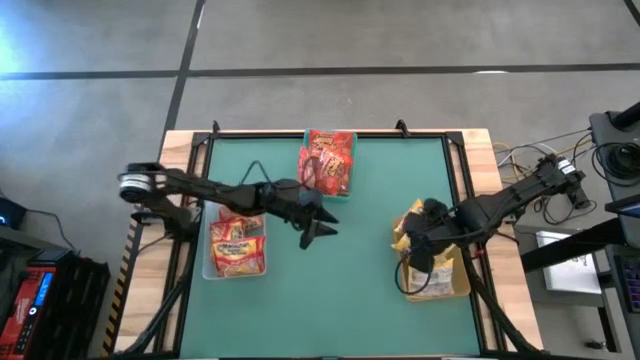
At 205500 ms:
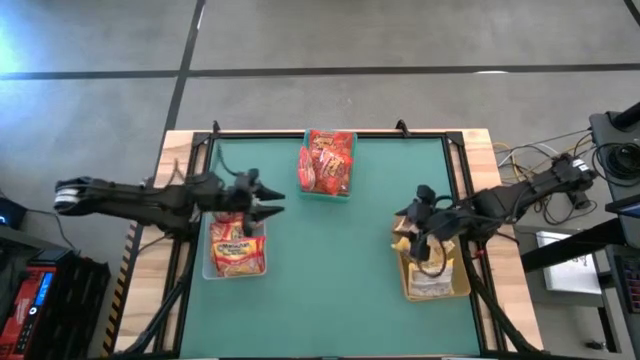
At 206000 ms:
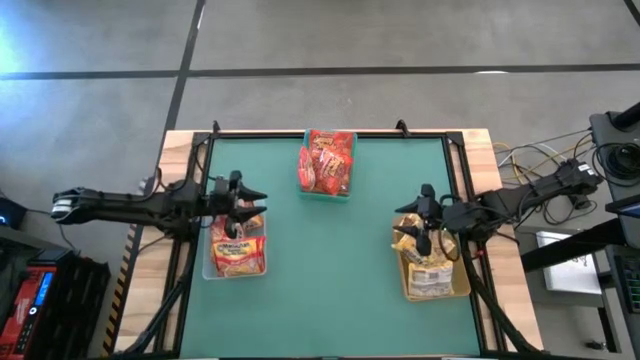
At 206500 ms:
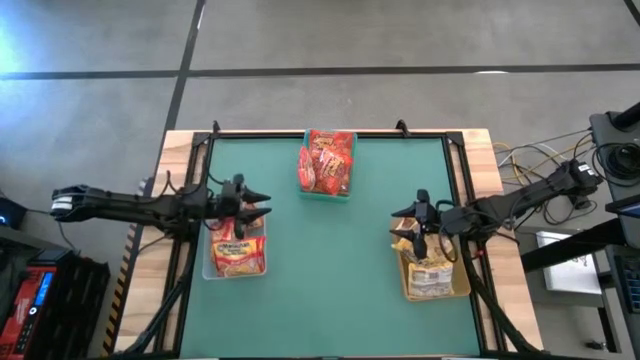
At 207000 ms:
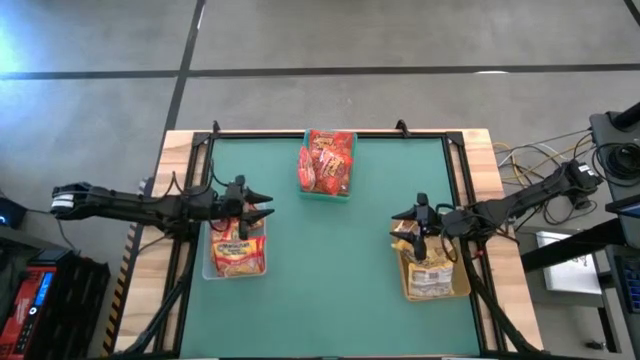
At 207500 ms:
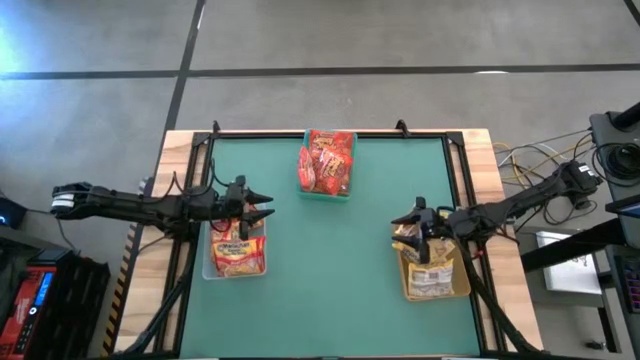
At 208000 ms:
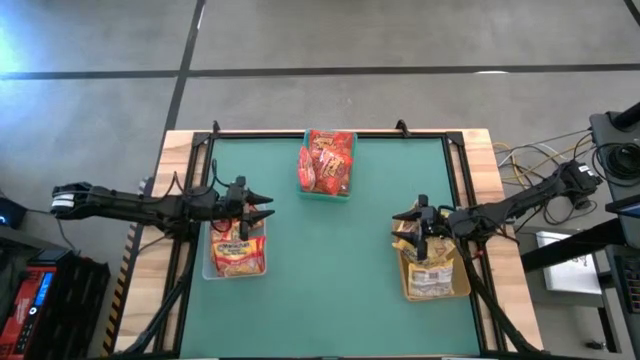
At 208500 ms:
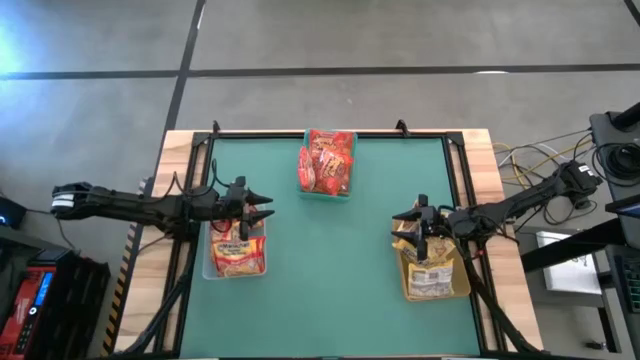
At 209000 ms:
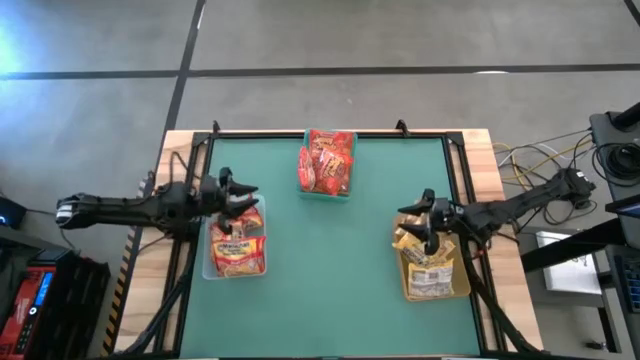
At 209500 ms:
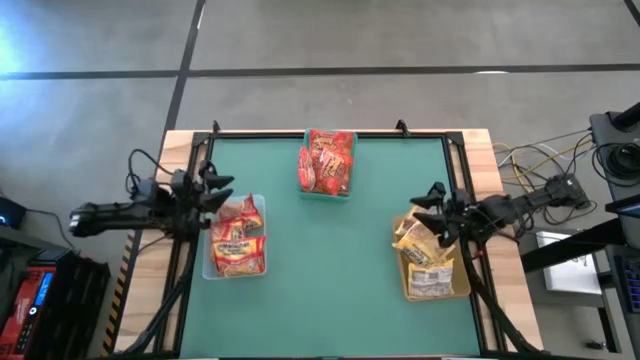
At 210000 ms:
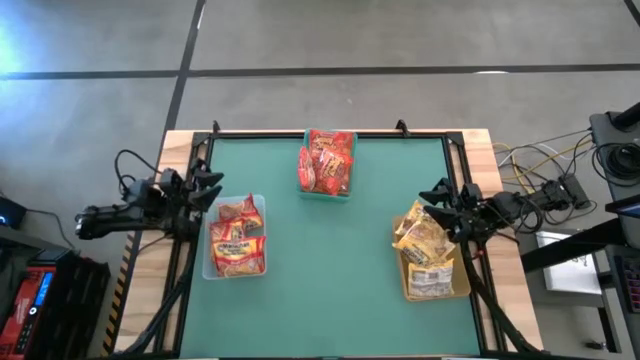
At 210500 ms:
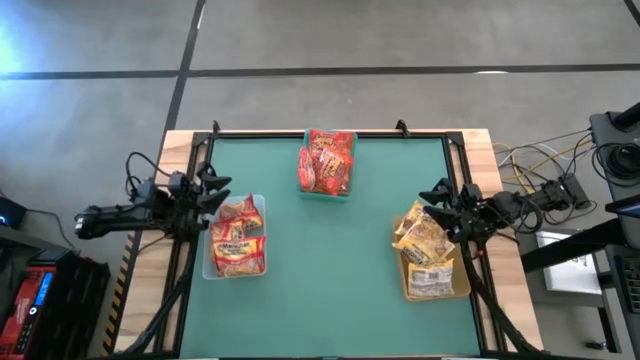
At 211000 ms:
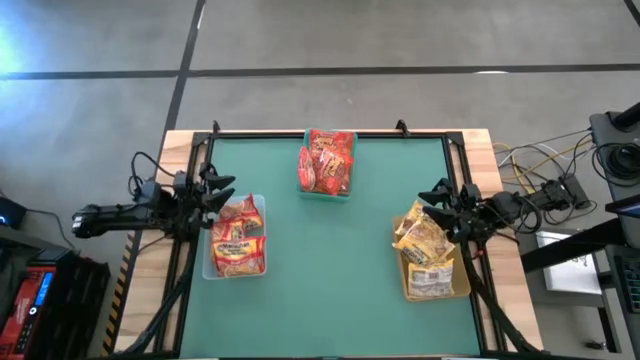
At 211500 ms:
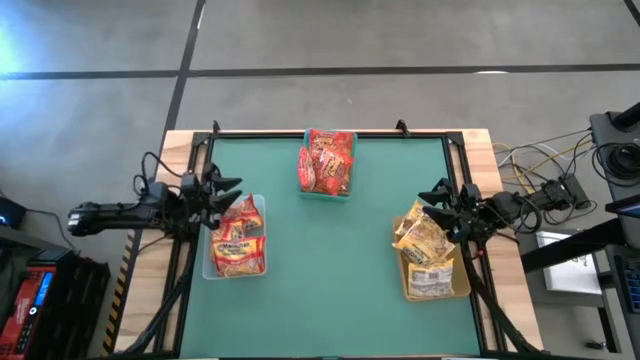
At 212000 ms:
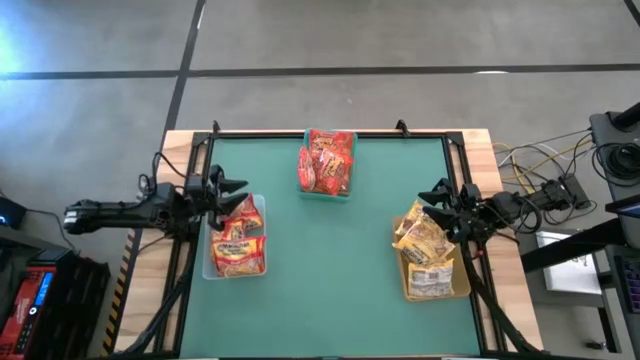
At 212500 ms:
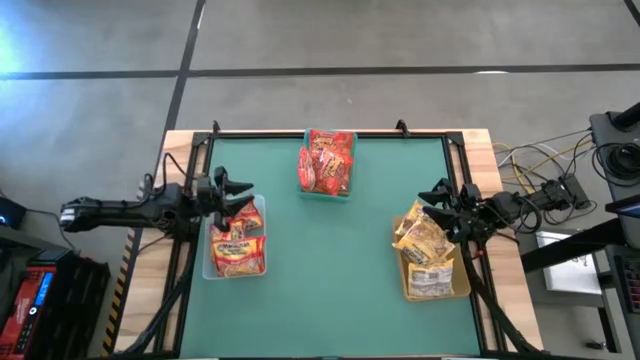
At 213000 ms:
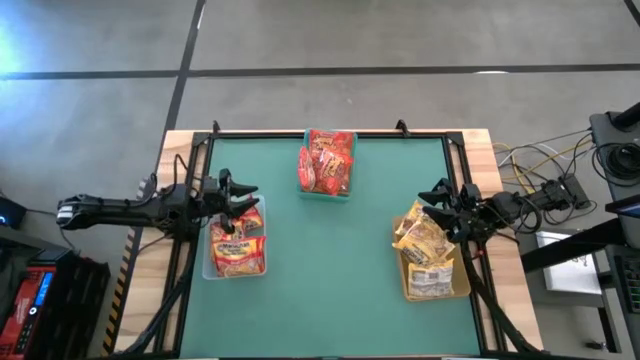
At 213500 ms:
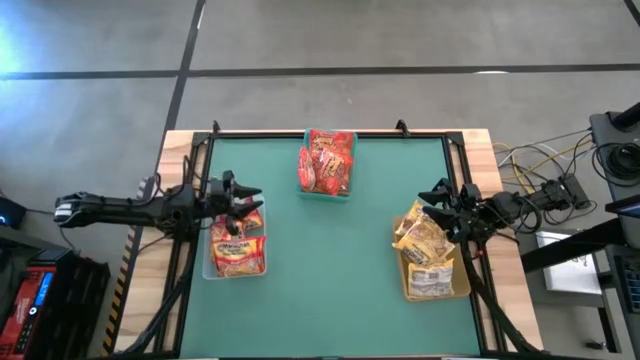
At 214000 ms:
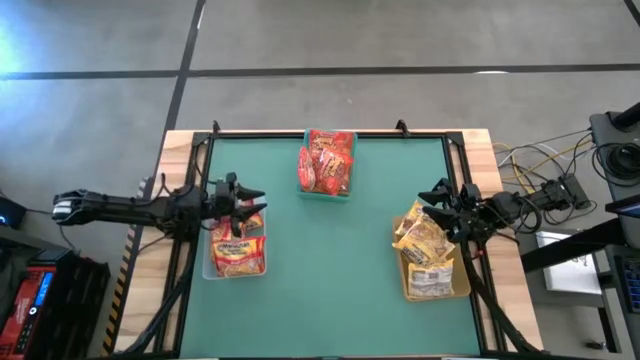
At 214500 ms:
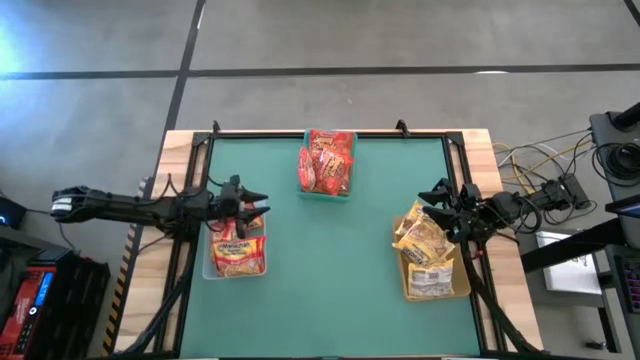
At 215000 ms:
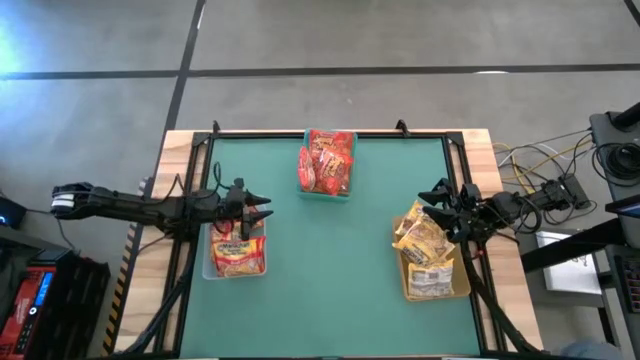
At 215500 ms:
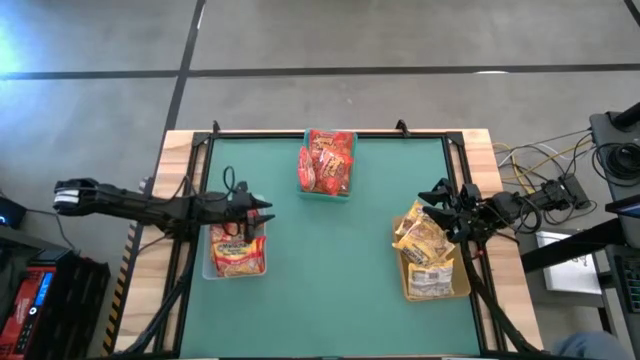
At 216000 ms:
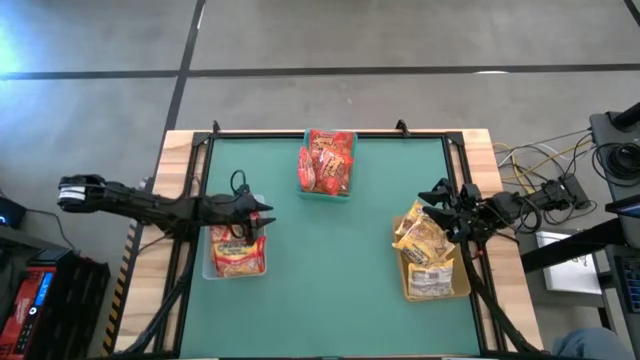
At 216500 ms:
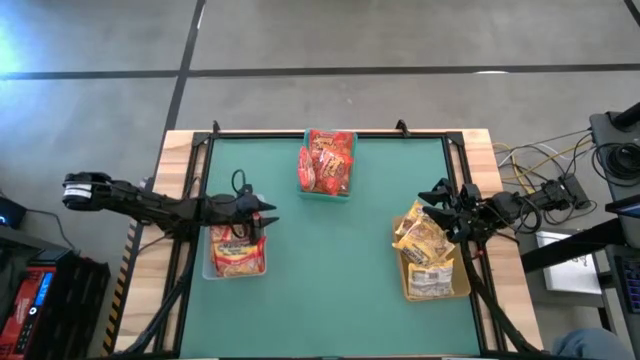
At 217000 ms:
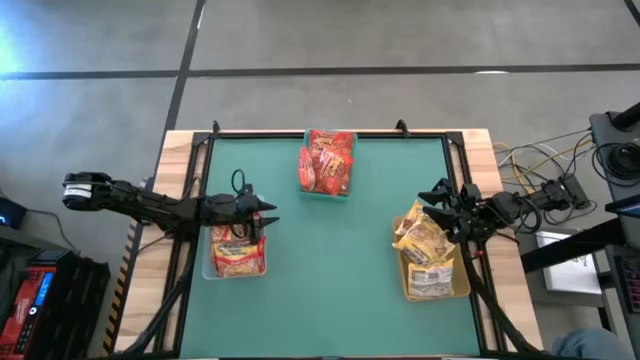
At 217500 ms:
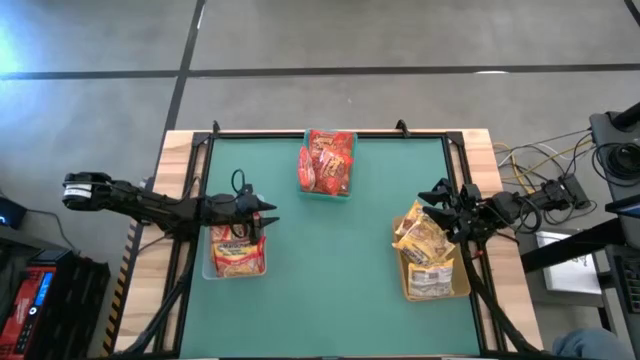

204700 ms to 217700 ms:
Task: Sort Maruchan noodles
Return to Home Position

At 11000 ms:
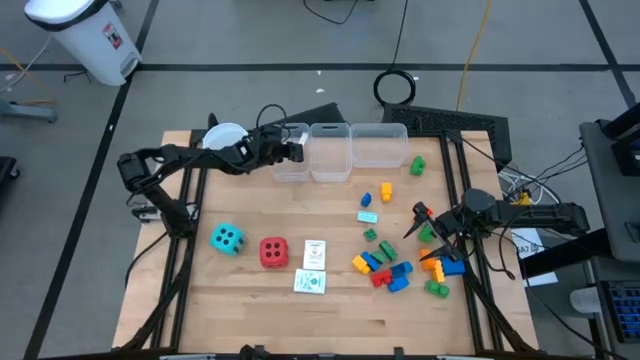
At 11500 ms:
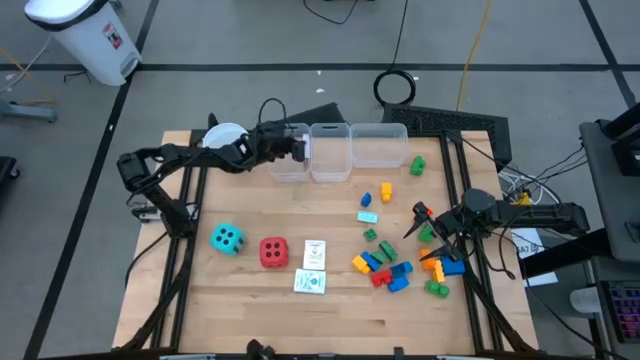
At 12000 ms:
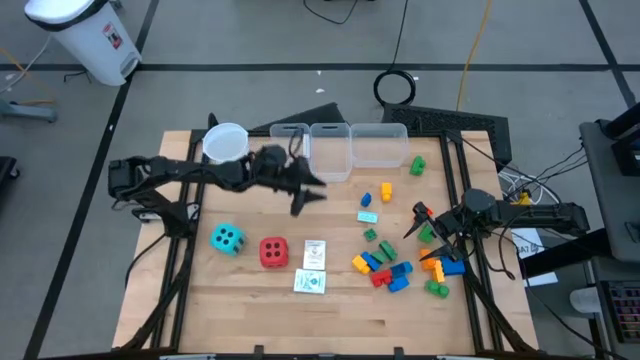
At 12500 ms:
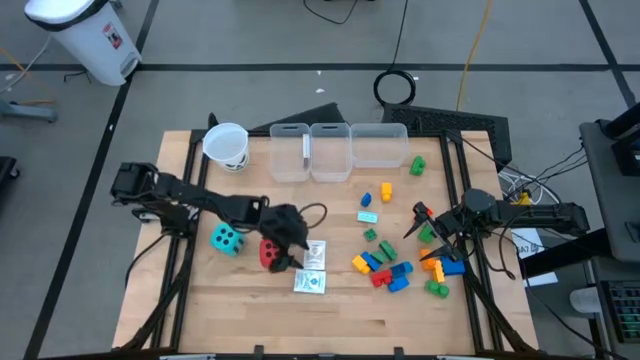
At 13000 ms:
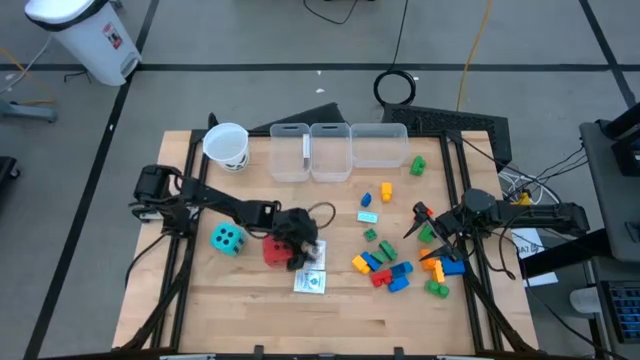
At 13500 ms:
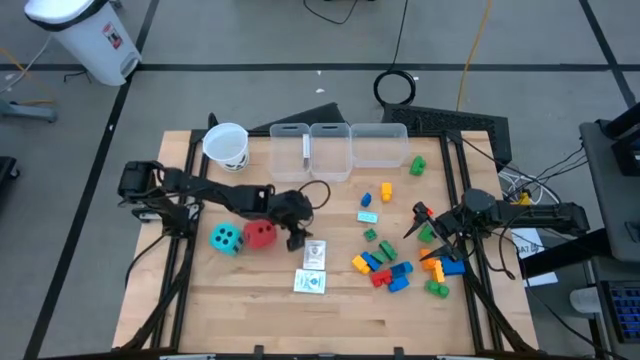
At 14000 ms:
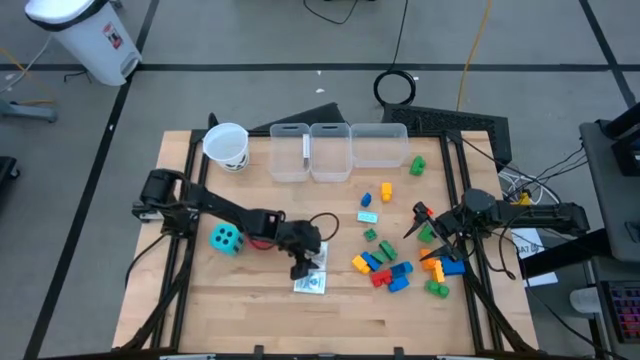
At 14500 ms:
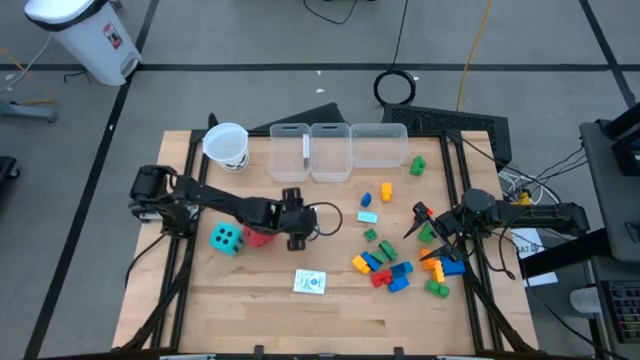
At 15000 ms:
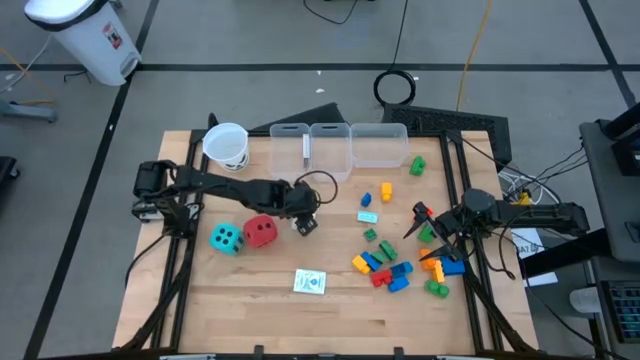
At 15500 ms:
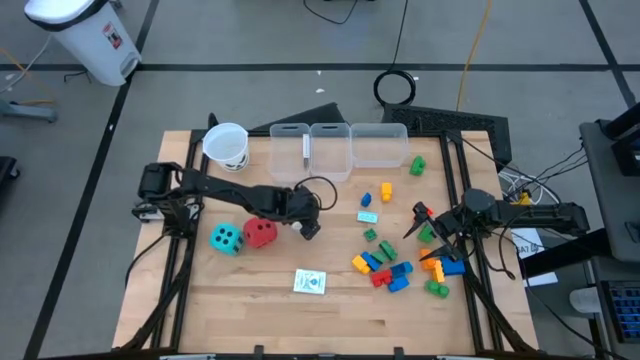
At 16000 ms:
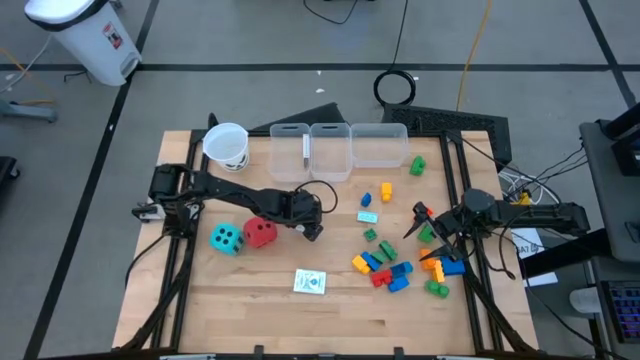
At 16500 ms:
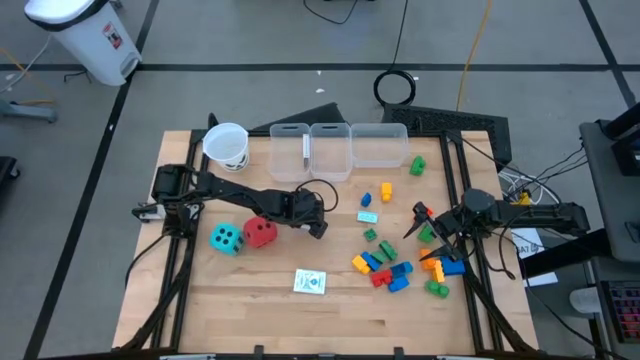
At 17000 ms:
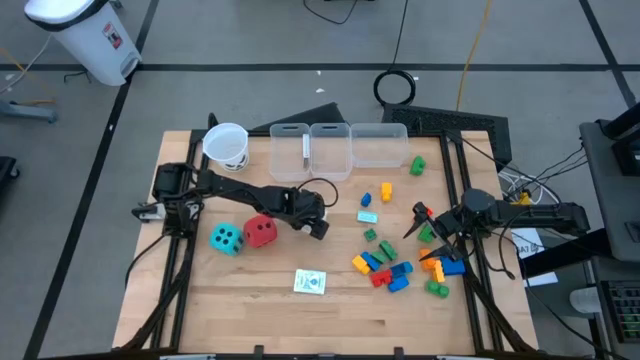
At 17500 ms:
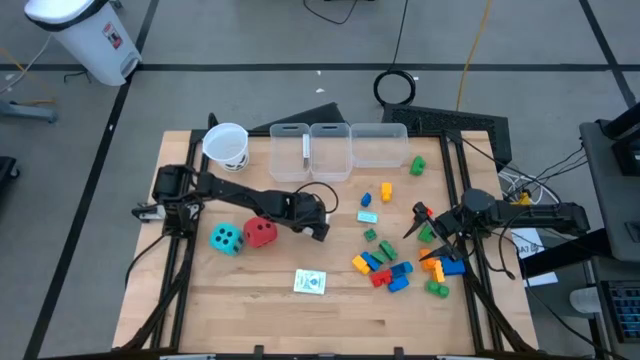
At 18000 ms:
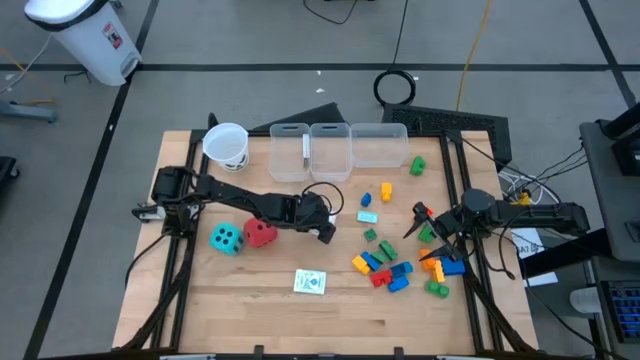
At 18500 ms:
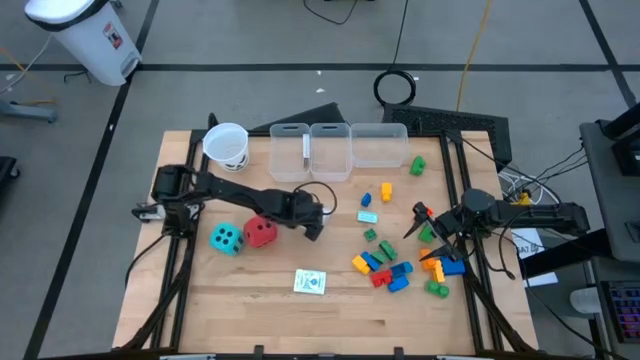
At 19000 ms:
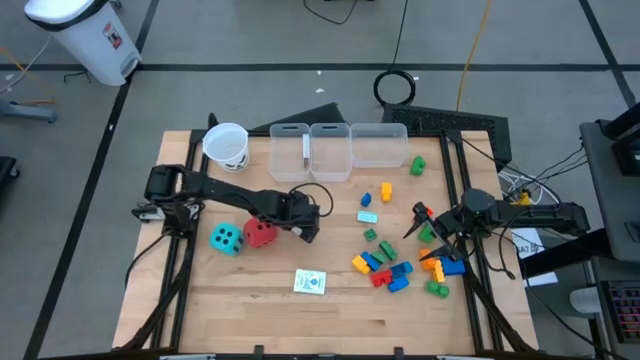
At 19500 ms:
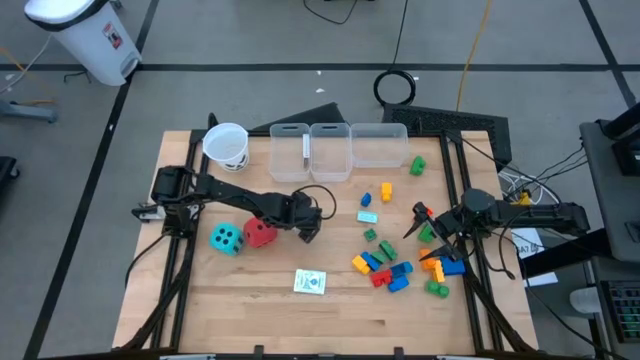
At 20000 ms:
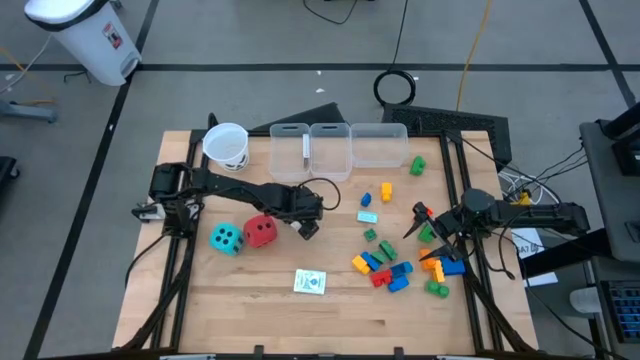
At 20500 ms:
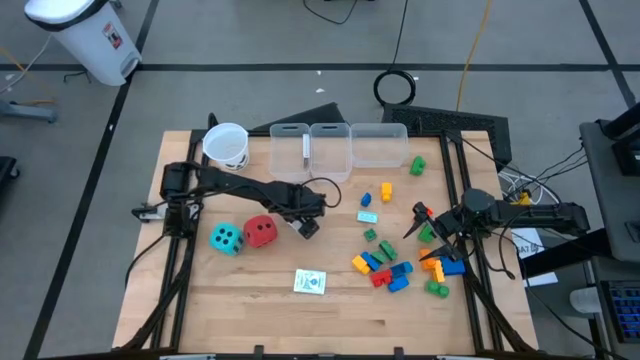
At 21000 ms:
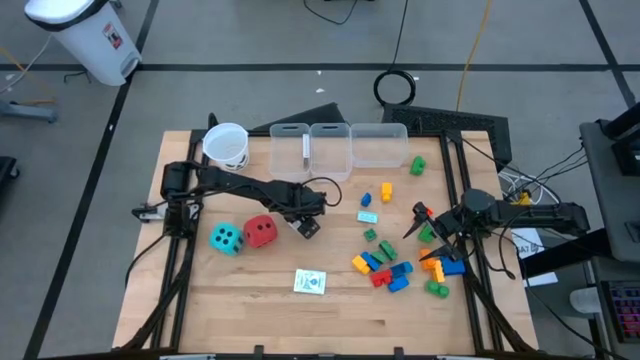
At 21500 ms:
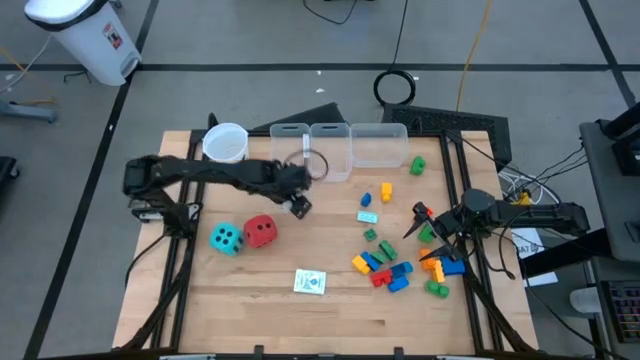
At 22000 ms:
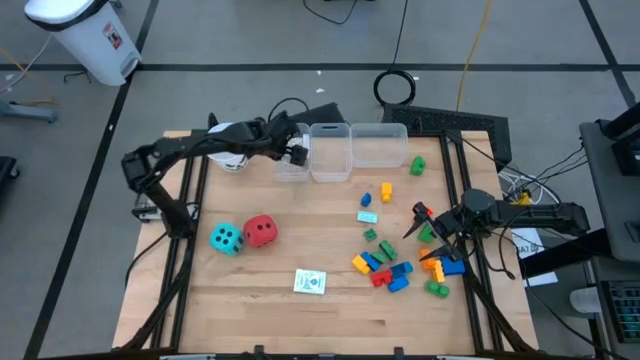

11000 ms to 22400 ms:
Task: Pick & Place Toys
Put the brown deck of cards into the left transparent bin
